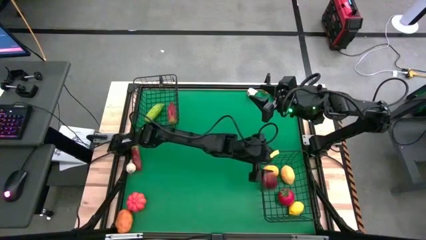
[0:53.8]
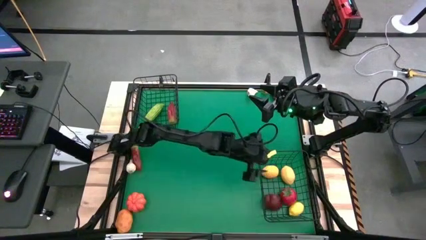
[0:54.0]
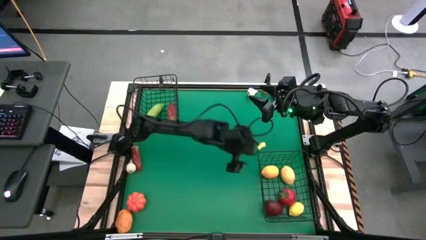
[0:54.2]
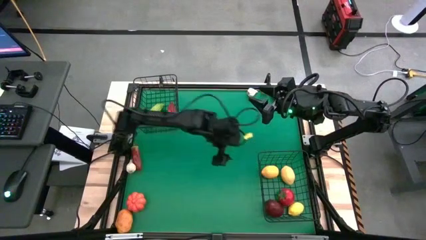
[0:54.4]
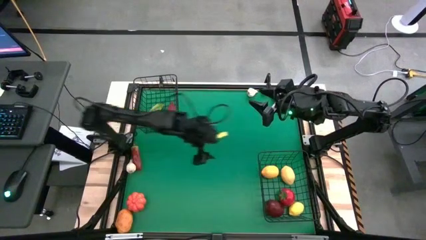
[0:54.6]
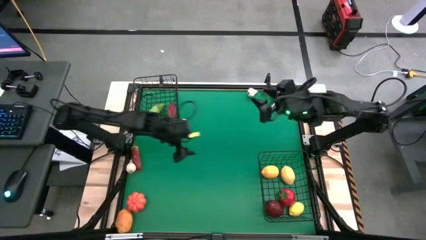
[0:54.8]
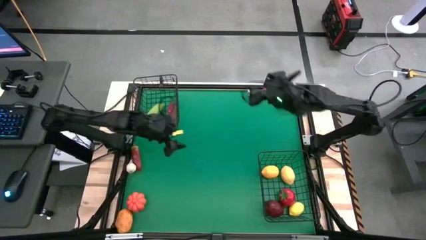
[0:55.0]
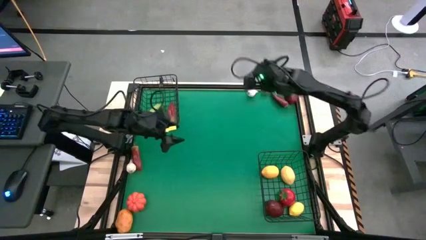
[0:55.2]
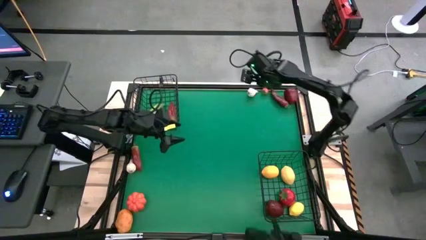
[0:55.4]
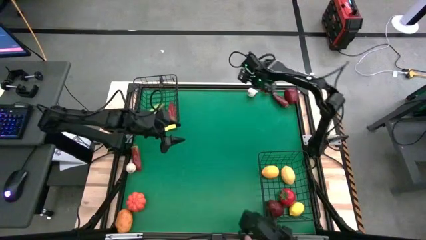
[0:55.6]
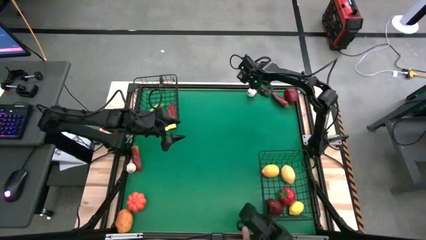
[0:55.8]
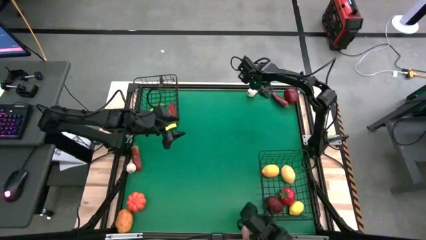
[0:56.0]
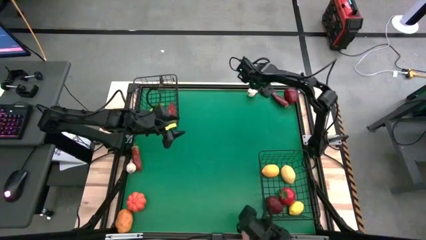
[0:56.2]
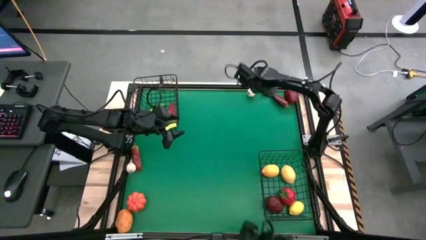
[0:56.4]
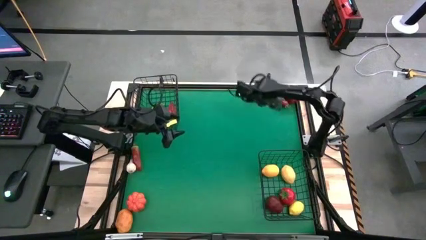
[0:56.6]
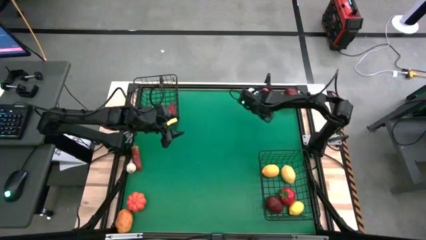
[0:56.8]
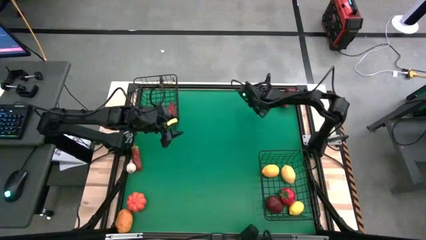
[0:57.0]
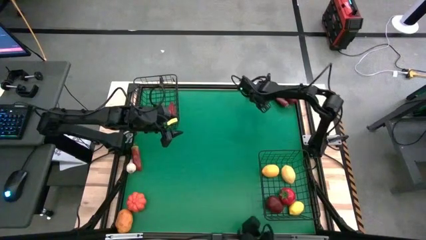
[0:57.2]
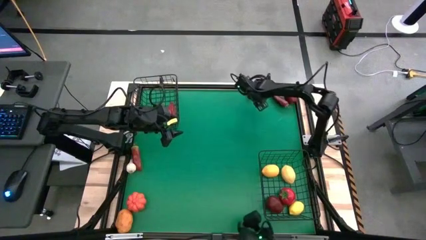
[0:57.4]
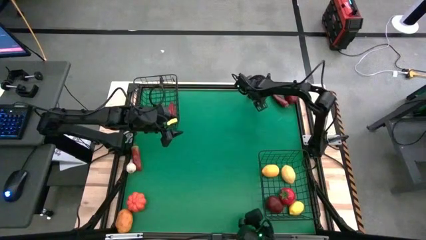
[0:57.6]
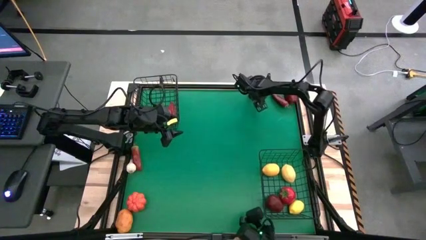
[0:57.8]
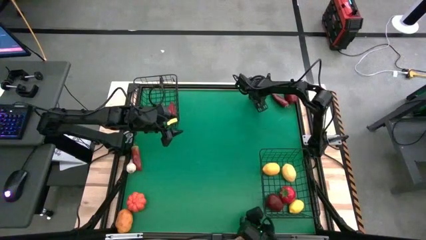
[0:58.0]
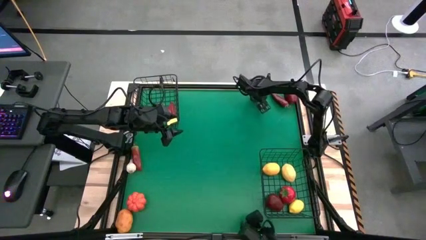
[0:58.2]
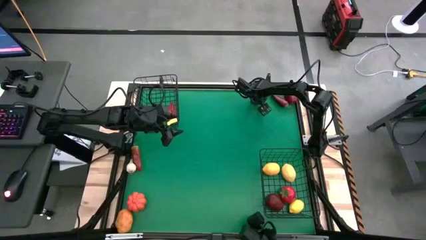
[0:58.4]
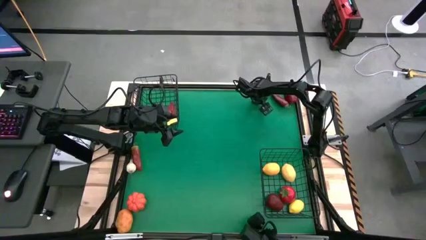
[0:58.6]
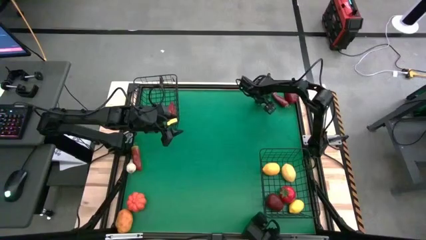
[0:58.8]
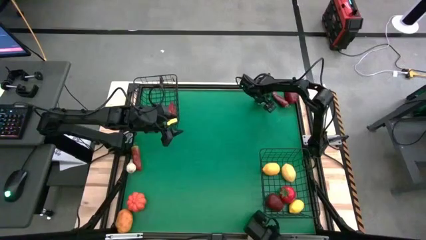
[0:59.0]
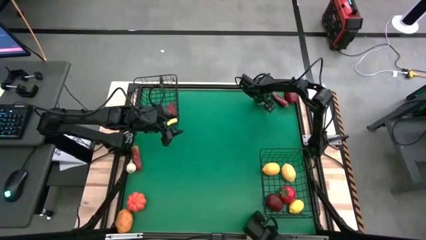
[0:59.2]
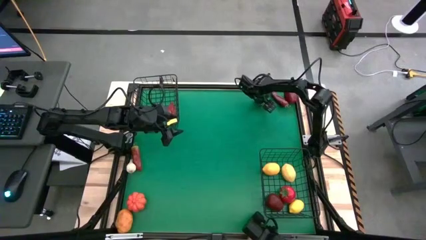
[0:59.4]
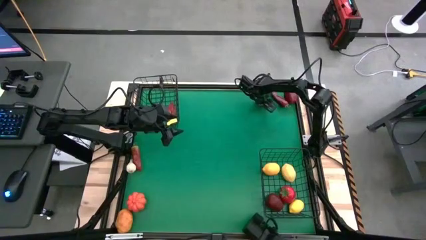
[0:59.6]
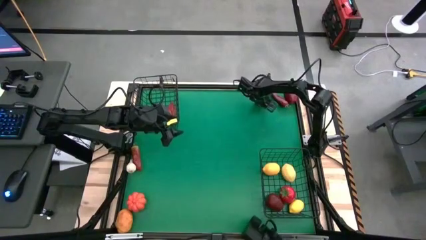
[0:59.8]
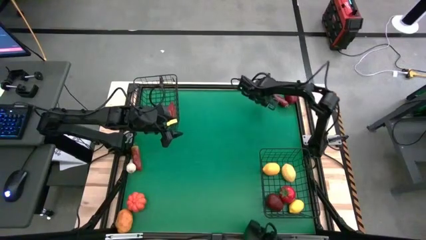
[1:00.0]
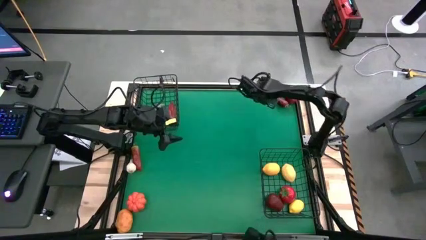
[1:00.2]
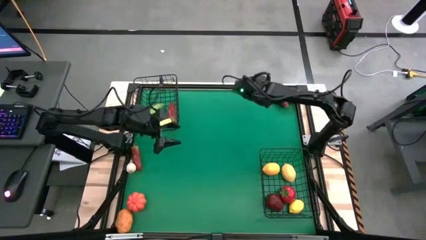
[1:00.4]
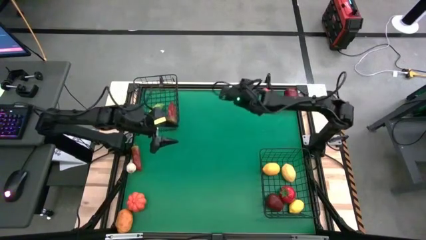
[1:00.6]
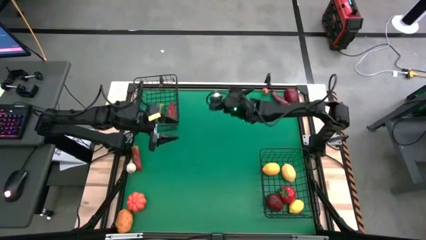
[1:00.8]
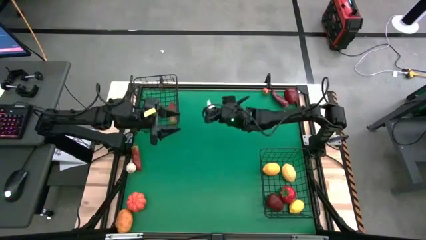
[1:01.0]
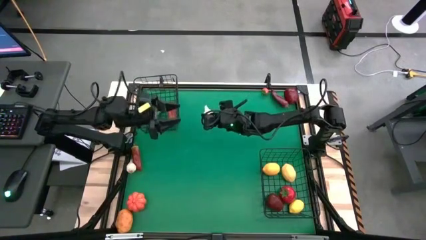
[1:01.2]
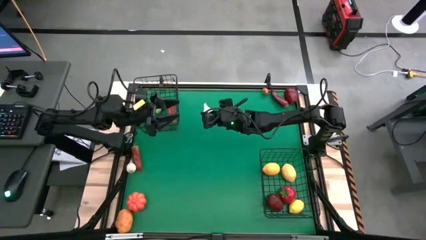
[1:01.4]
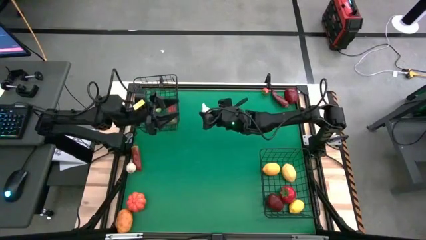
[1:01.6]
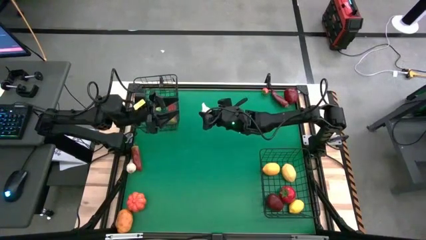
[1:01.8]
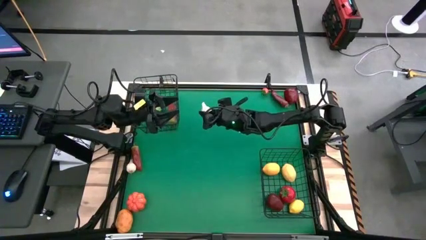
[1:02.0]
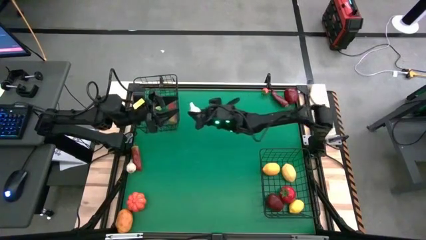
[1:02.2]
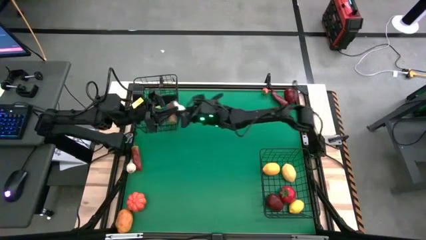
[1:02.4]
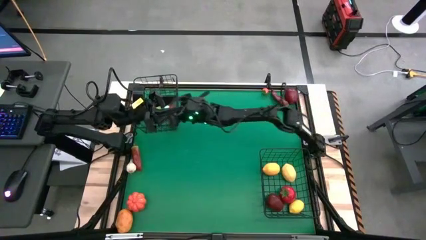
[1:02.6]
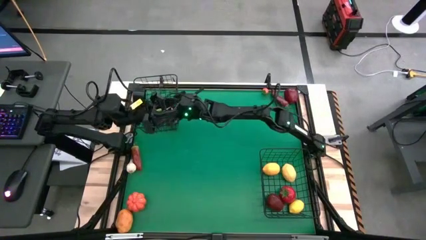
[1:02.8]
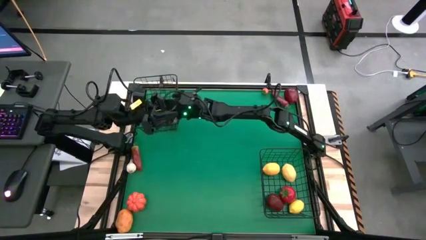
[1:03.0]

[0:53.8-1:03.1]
Task: Sort produce into baskets
Put the top white garlic into the top black wire basket

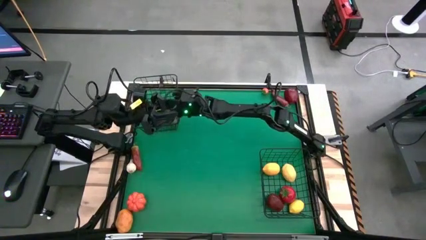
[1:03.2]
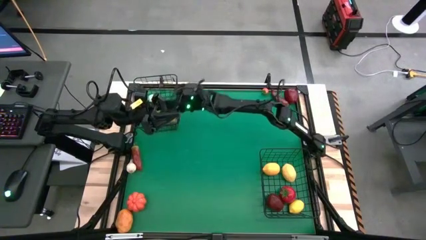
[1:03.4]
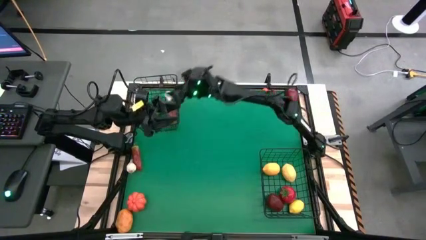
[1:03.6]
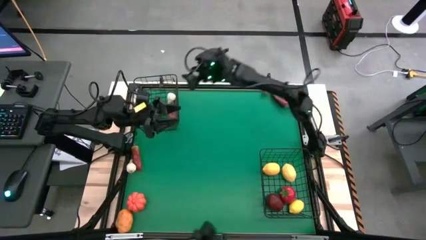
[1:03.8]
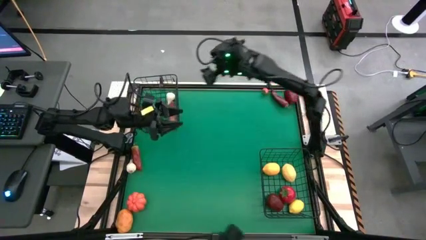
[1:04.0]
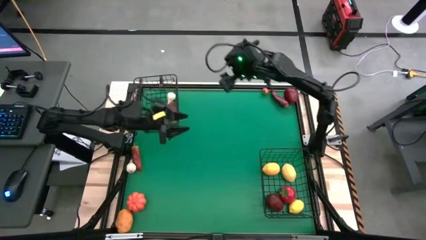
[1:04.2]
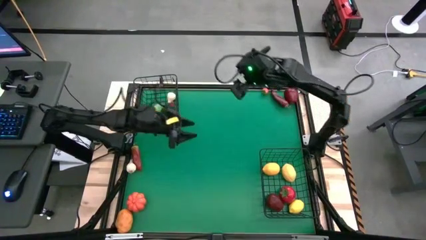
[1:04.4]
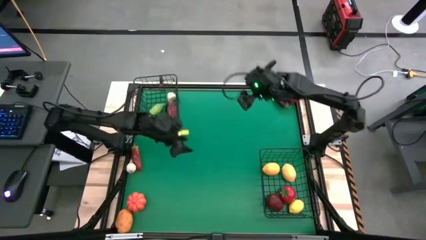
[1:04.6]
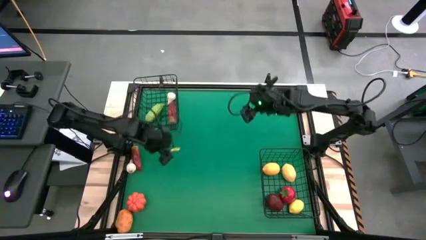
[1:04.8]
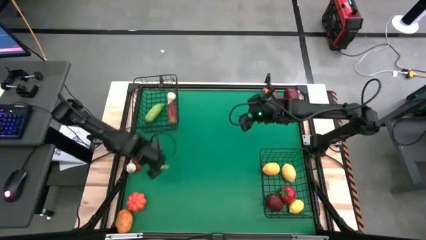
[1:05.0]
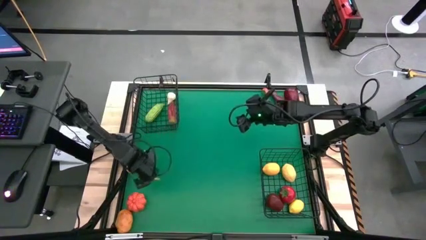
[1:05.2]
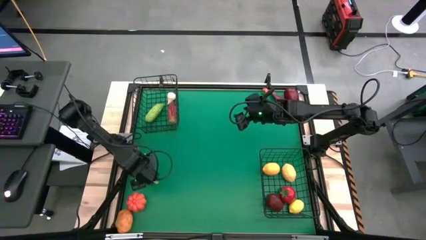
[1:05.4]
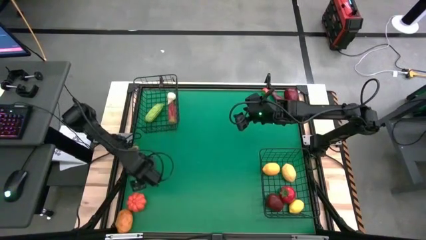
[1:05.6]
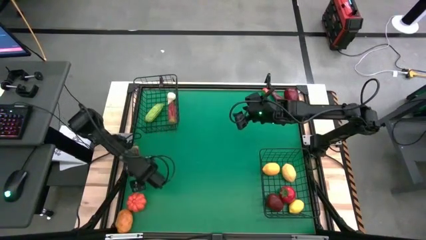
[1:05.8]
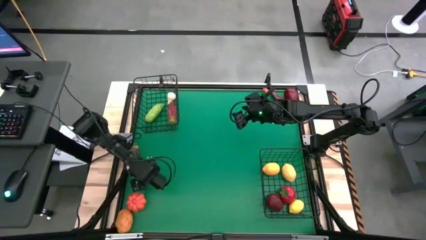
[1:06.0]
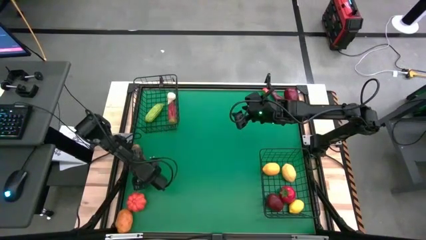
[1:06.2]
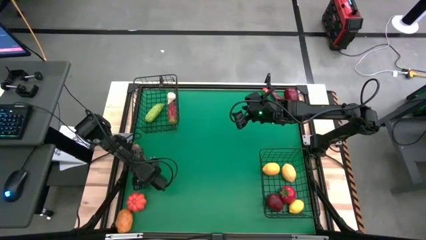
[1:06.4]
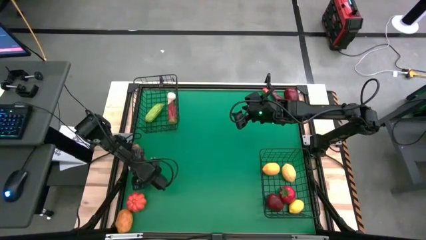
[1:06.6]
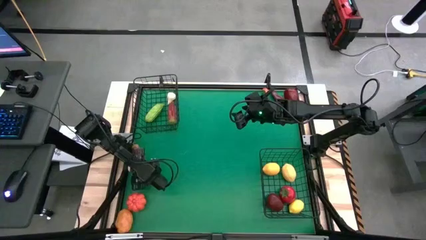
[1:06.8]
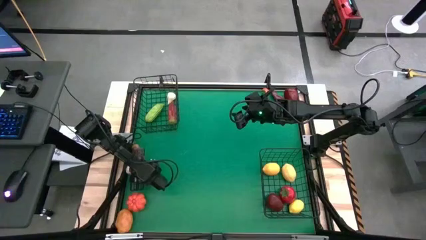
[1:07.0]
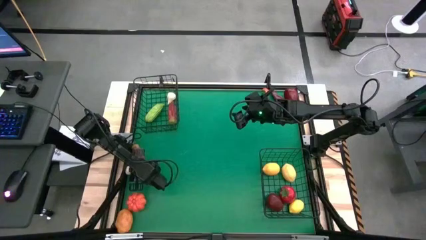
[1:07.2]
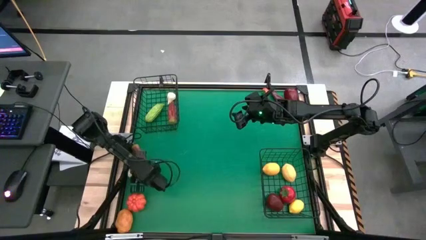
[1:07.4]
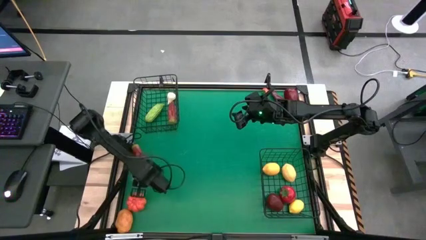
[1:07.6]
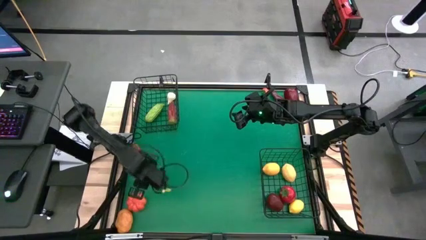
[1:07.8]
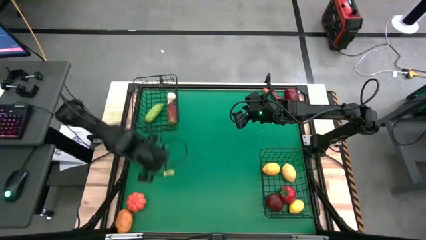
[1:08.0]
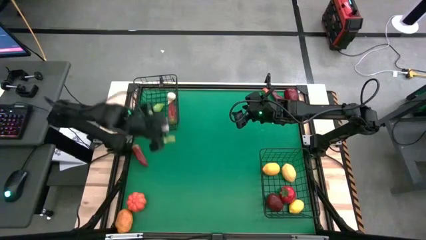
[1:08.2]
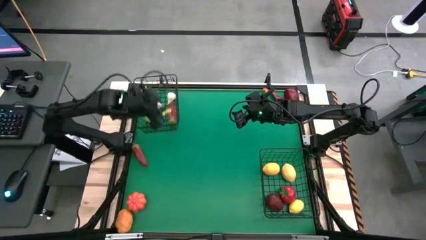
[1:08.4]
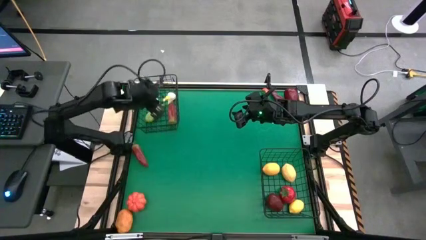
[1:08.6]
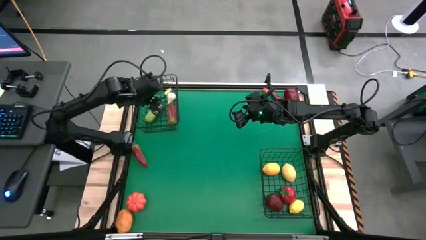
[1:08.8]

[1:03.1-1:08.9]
Put the white garlic into the top black wire basket

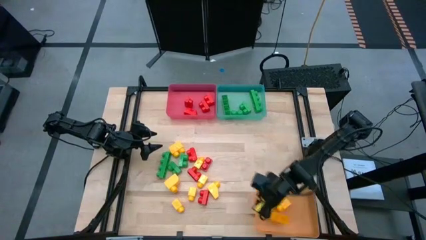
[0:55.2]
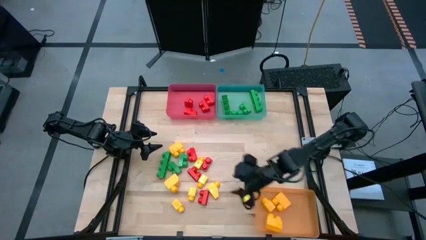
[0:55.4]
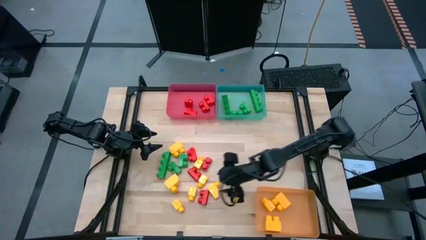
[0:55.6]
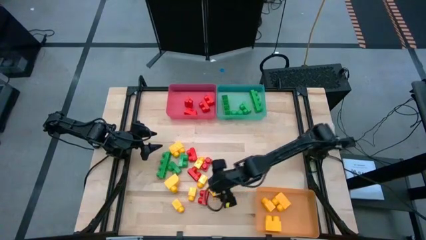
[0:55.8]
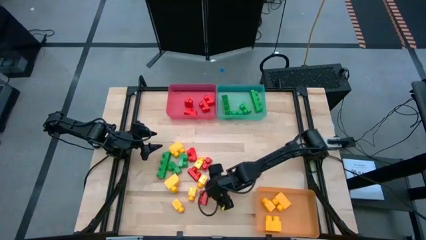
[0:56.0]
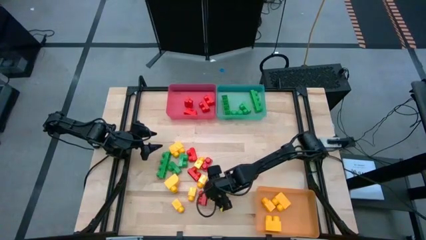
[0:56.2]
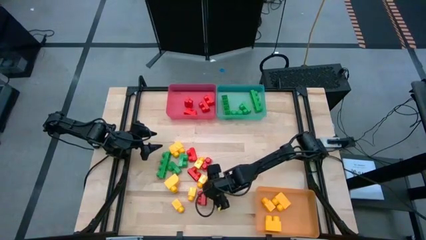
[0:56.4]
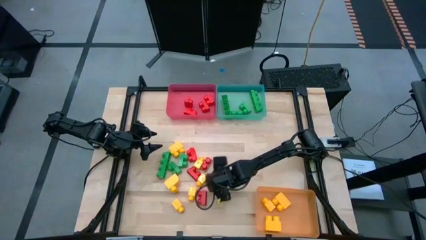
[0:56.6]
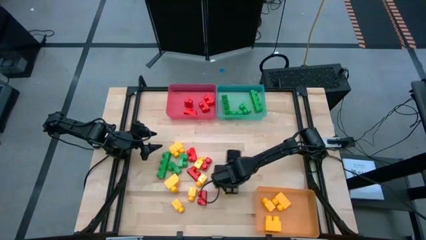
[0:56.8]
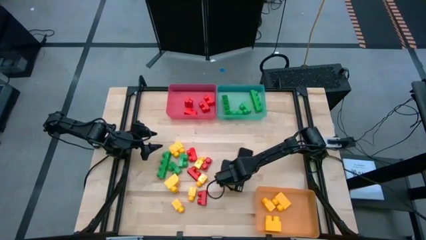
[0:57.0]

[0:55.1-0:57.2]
Task: Sort blocks
Move the bottom right yellow game piece closer to the right
